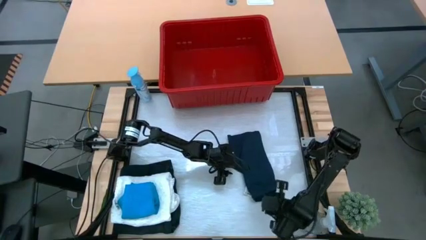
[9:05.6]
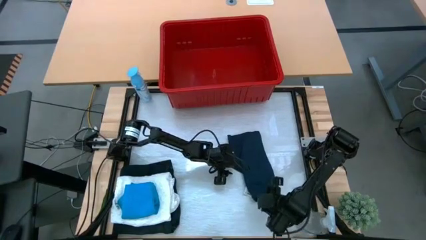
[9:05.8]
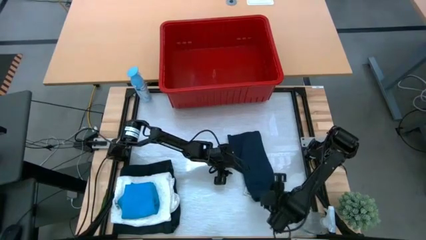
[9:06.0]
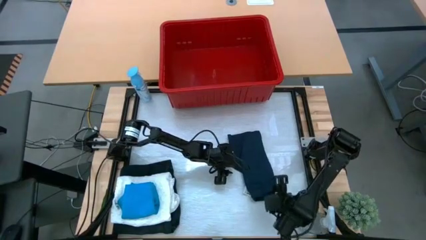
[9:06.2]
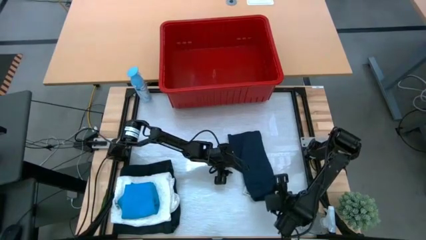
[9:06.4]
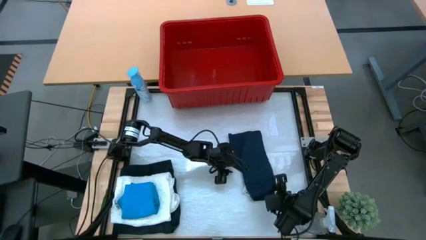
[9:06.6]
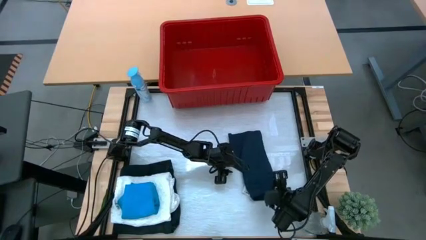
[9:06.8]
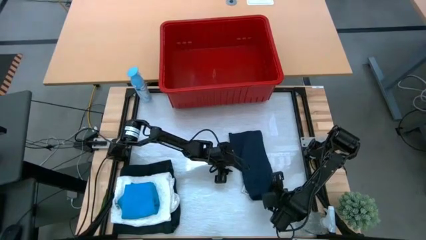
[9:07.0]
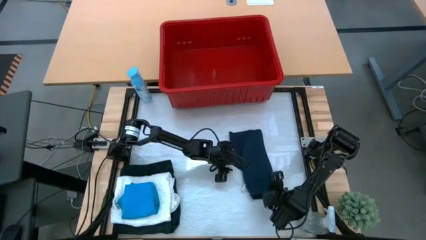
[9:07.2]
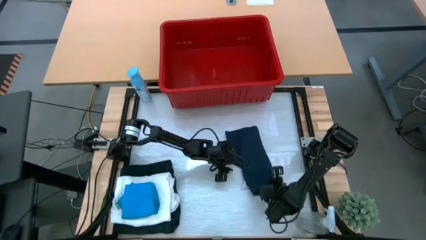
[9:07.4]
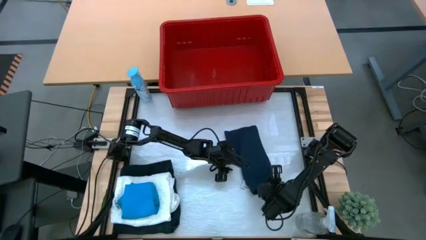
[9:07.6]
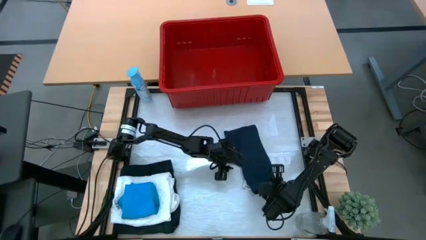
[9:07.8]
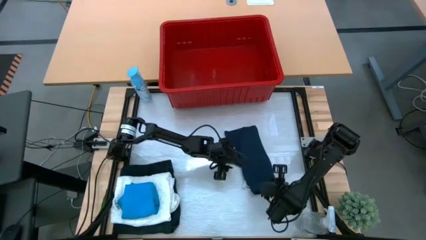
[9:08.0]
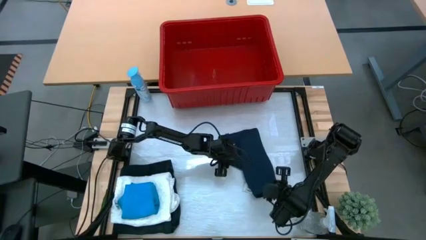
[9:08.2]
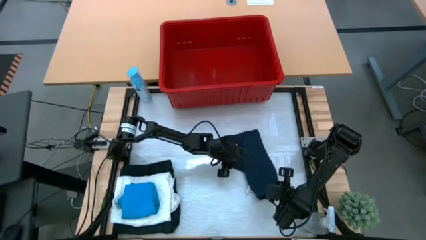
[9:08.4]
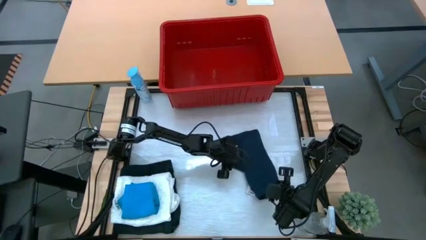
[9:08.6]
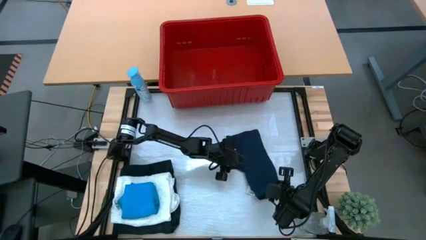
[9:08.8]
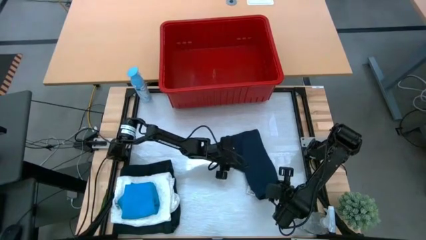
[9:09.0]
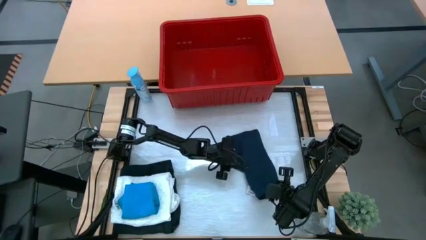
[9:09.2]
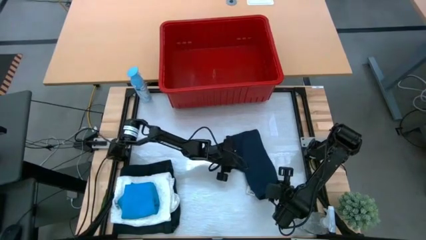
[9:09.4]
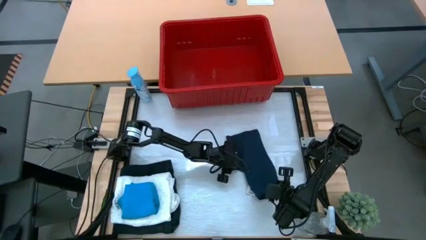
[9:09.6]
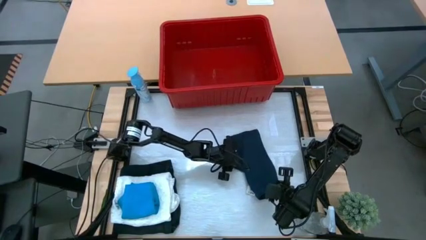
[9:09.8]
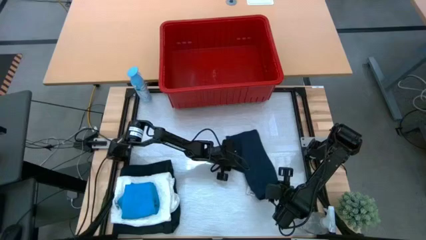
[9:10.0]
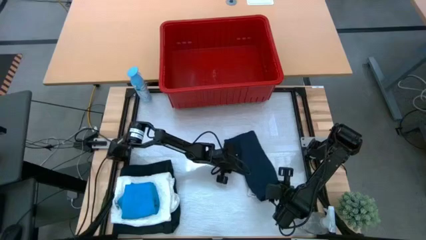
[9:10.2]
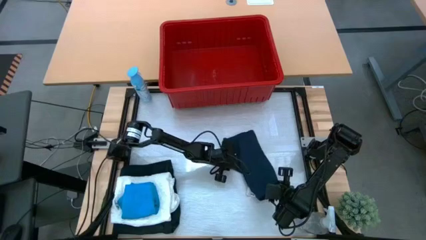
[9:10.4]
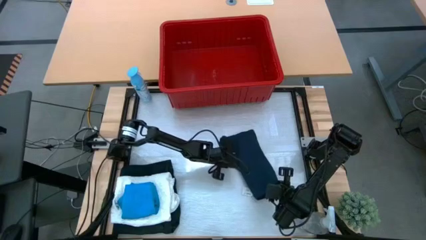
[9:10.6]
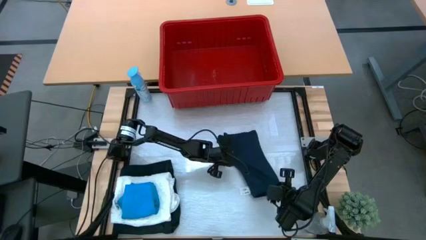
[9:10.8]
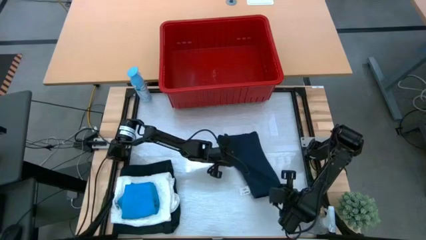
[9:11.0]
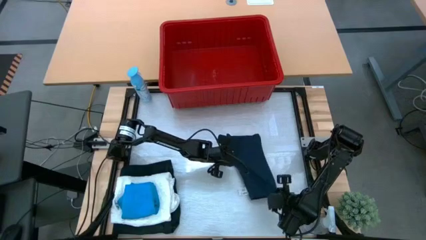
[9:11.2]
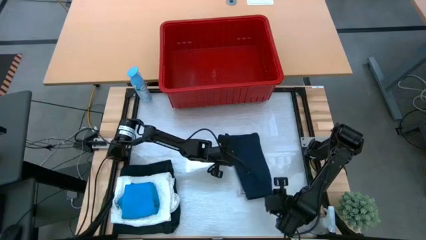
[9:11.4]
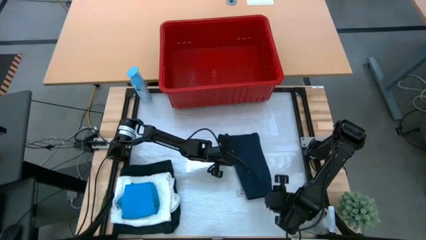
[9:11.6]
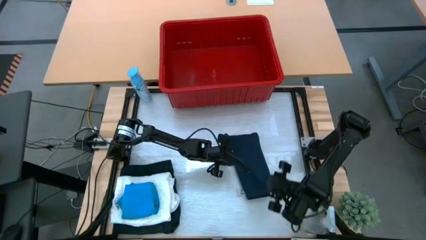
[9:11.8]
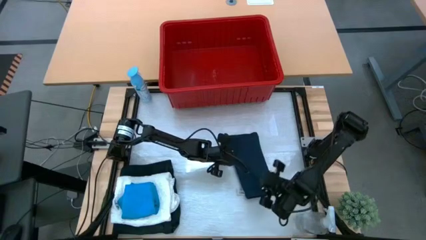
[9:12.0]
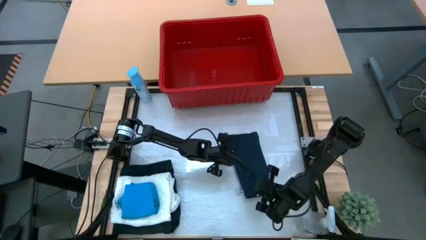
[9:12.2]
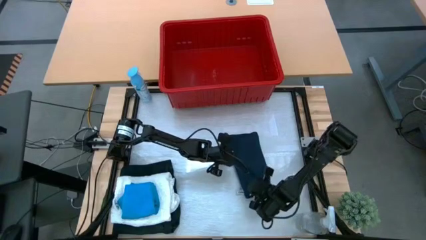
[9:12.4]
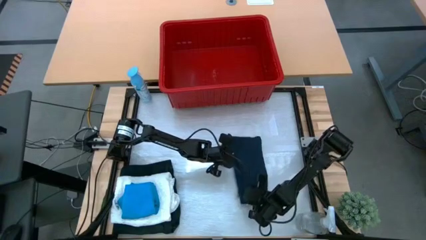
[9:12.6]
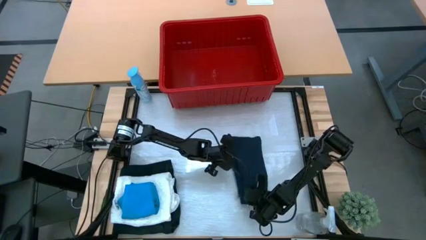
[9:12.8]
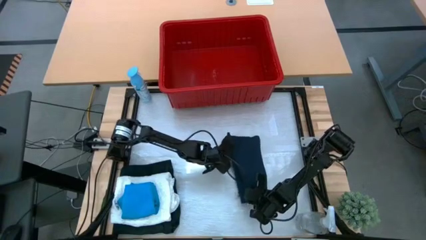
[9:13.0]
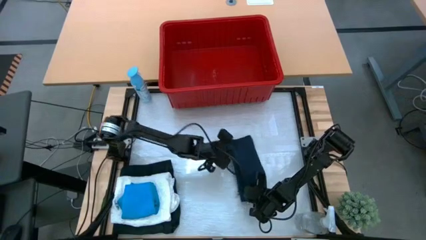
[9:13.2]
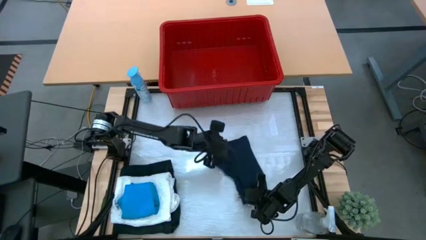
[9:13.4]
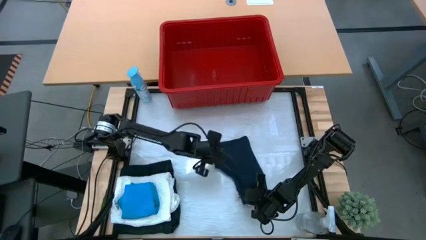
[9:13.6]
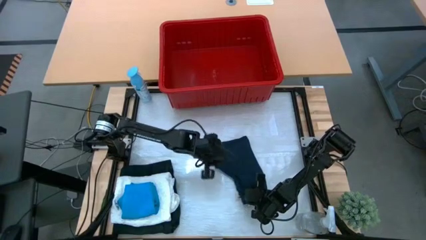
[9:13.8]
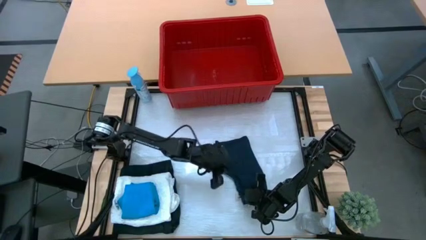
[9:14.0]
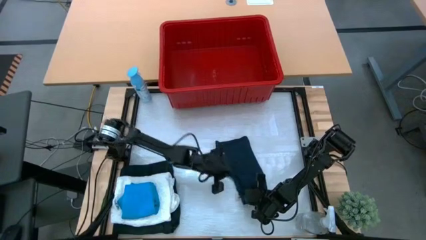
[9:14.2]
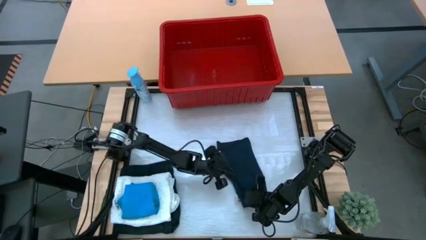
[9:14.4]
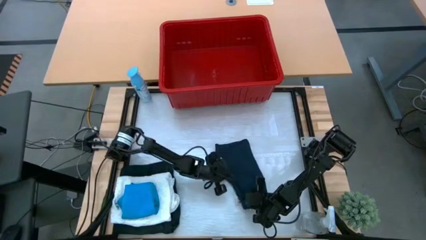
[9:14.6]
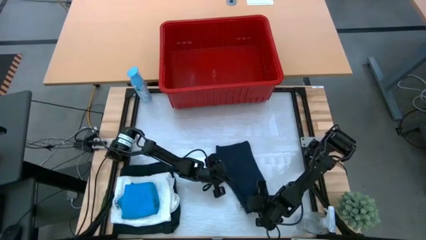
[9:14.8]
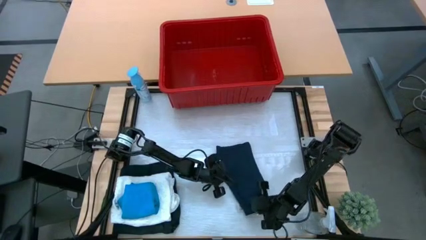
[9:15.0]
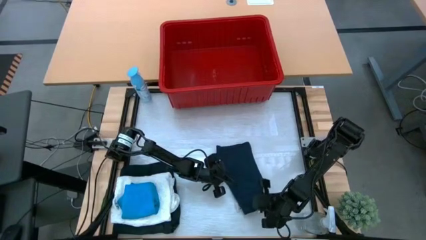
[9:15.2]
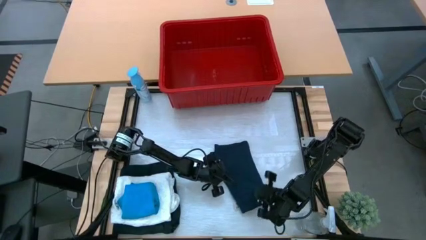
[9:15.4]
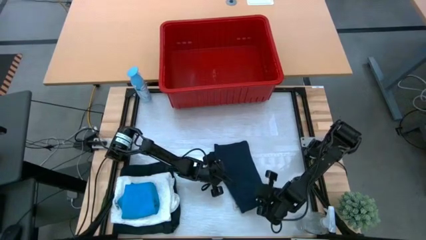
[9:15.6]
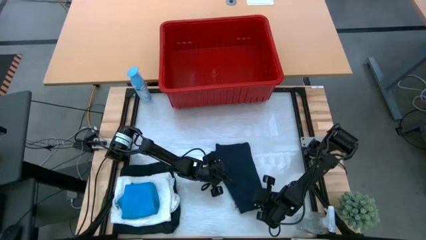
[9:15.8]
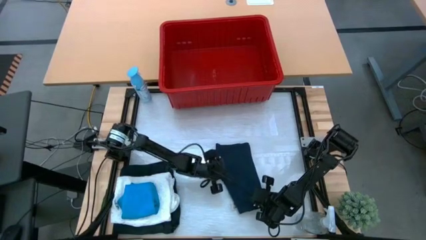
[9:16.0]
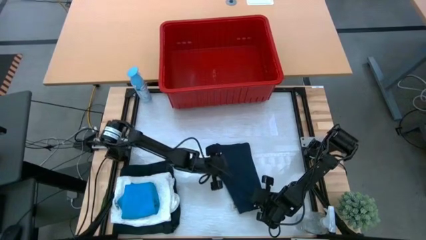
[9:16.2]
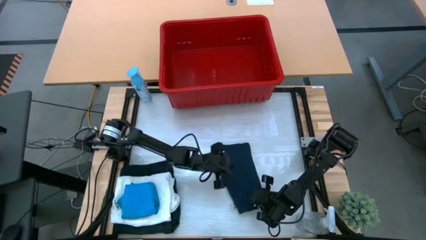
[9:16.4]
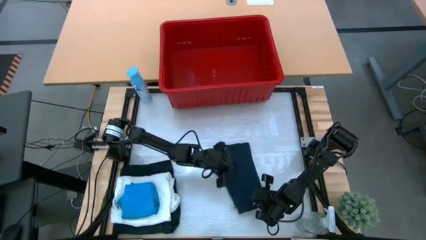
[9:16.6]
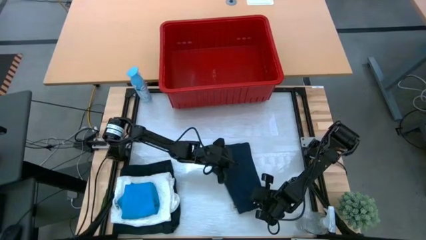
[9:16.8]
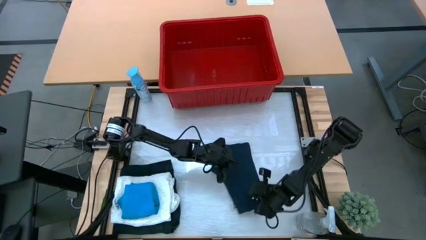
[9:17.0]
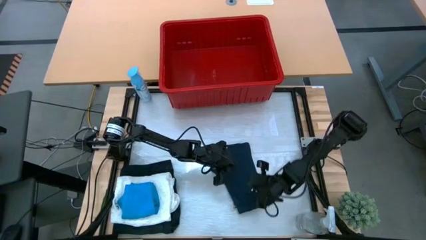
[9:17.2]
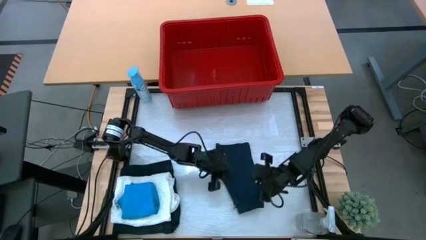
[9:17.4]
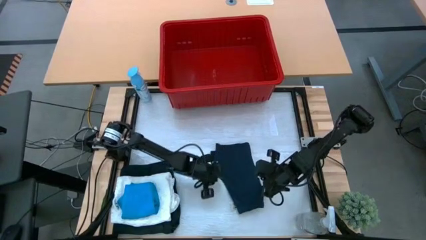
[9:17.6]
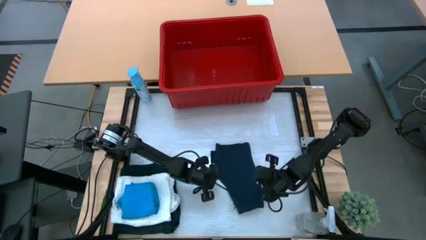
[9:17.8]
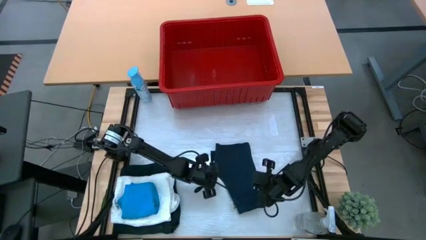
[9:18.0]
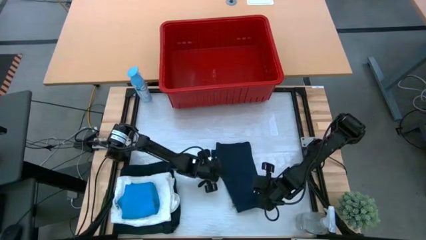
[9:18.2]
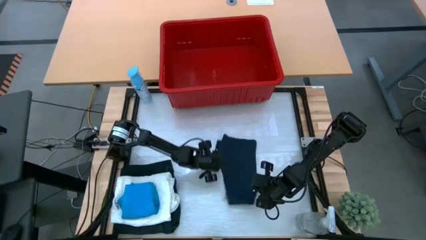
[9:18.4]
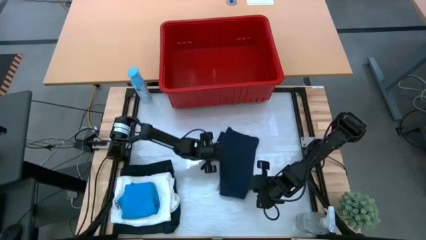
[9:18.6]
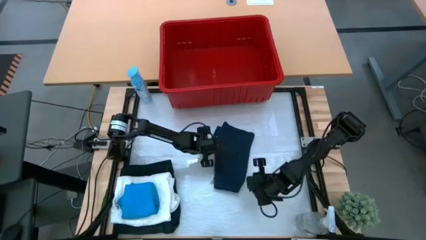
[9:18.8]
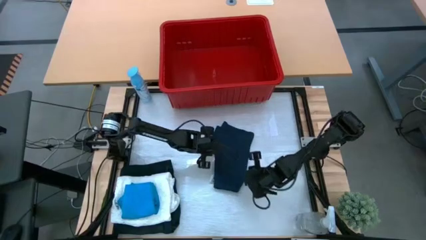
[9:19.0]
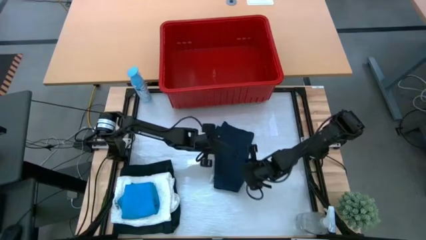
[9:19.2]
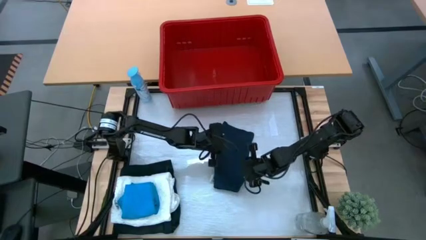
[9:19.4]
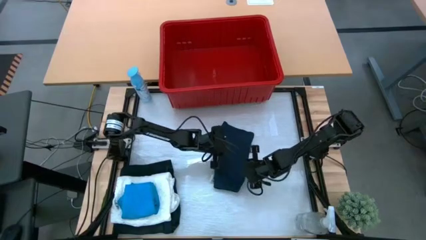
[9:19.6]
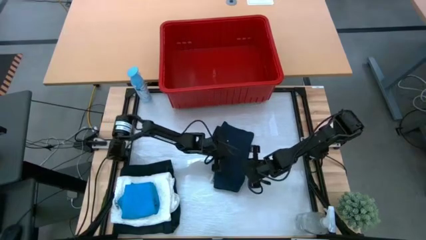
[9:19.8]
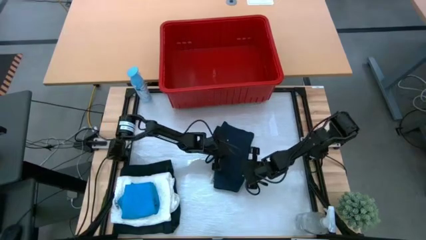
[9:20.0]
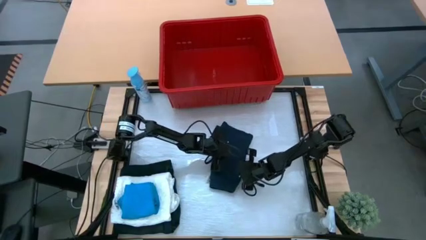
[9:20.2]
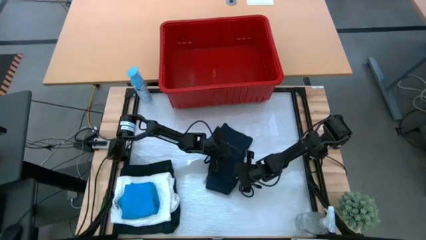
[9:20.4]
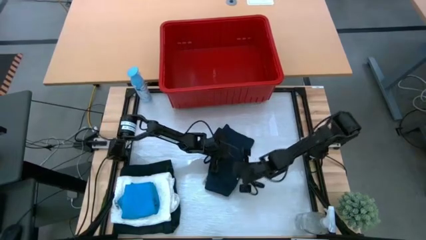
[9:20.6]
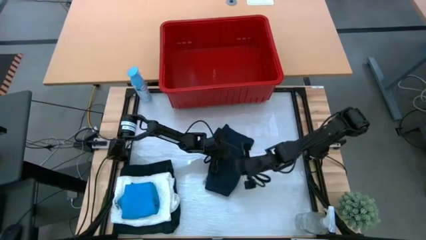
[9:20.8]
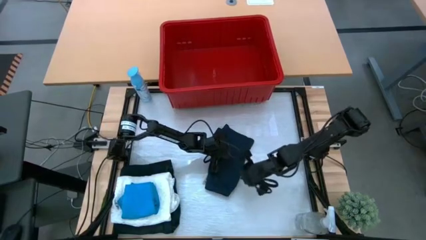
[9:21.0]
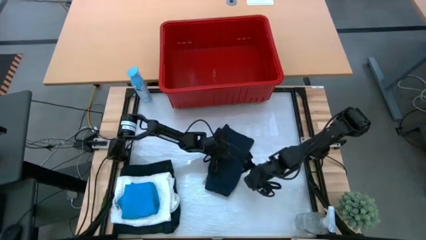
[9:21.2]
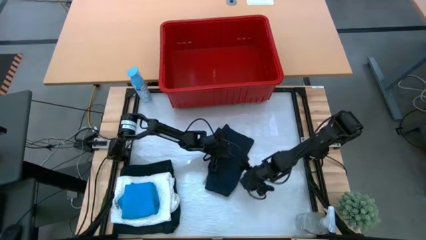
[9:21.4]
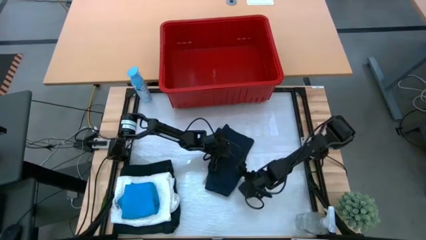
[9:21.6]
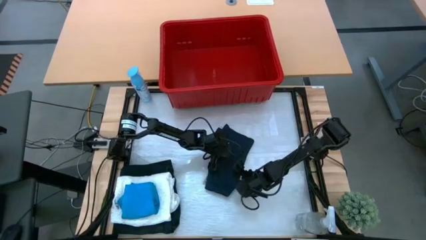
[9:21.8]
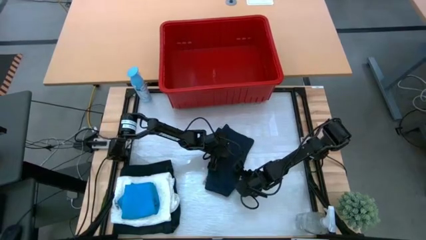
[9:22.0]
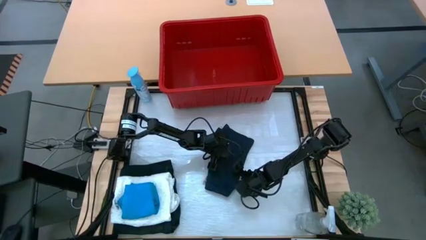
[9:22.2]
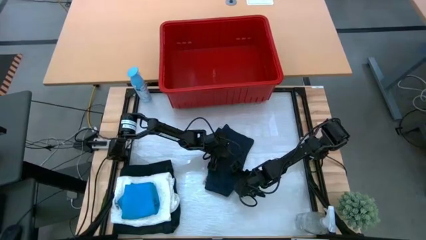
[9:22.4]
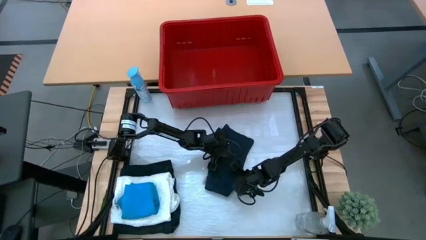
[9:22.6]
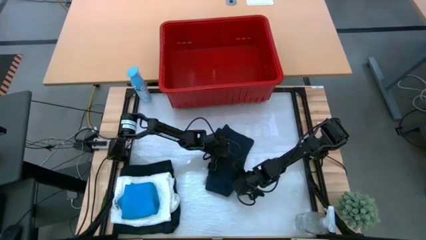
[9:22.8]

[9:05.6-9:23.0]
Task: Fold Laundry from Bin
Fold the gray shorts from the red bin
